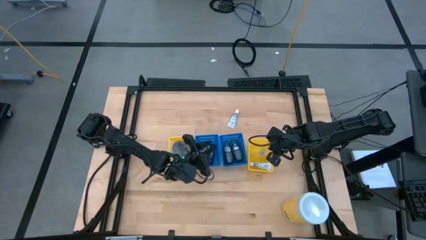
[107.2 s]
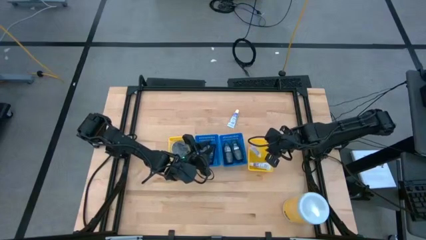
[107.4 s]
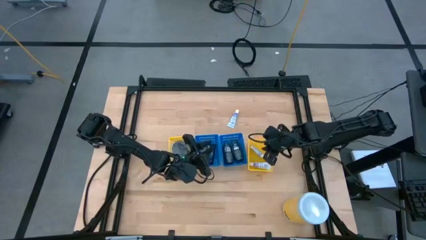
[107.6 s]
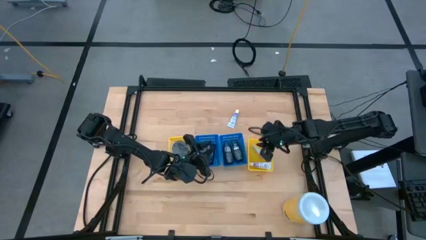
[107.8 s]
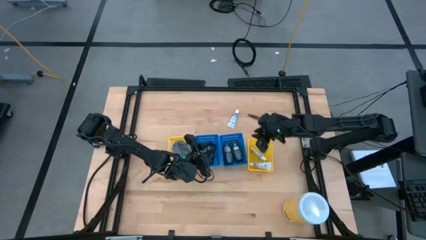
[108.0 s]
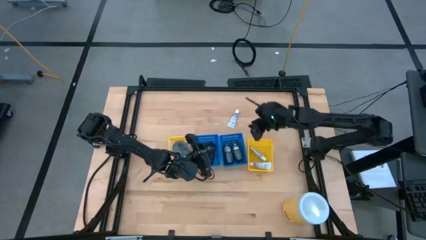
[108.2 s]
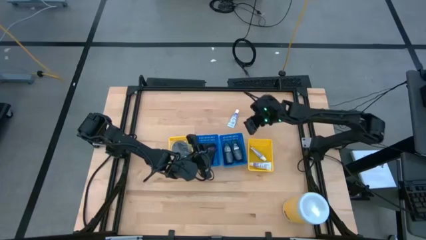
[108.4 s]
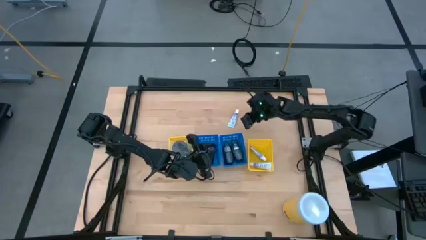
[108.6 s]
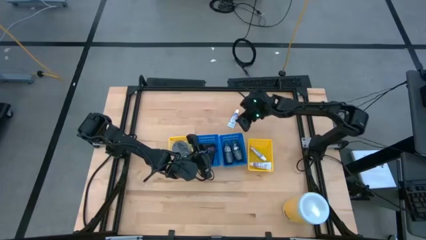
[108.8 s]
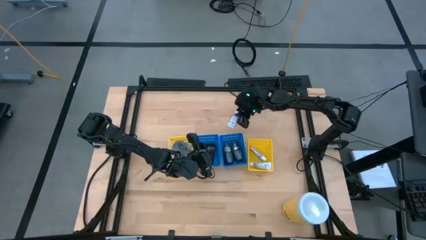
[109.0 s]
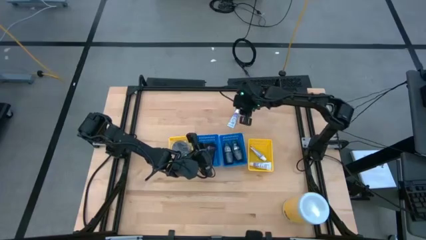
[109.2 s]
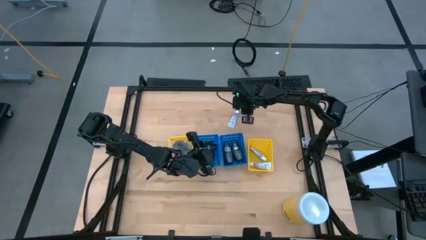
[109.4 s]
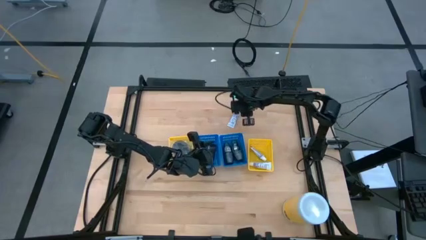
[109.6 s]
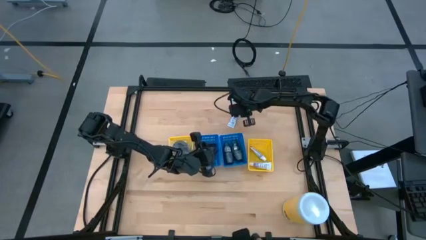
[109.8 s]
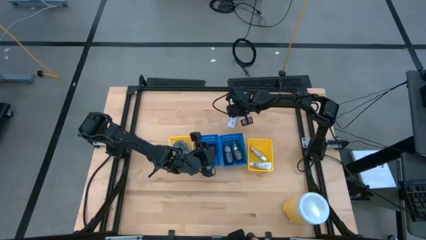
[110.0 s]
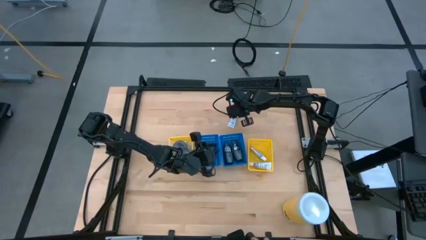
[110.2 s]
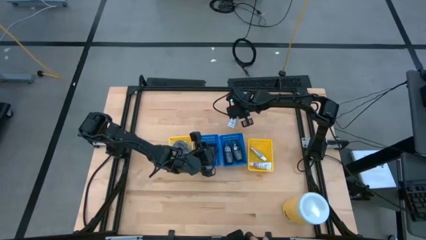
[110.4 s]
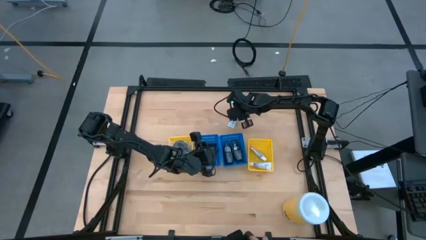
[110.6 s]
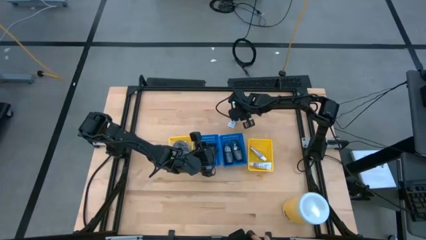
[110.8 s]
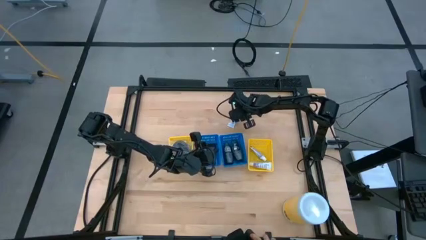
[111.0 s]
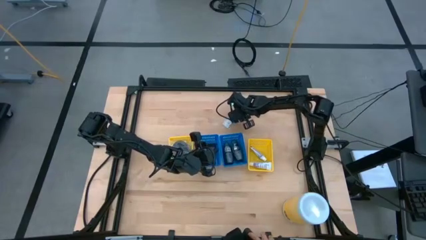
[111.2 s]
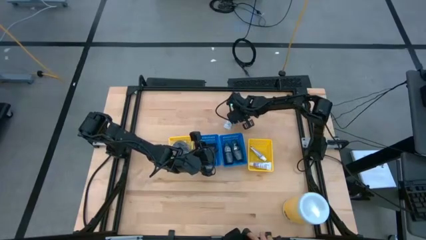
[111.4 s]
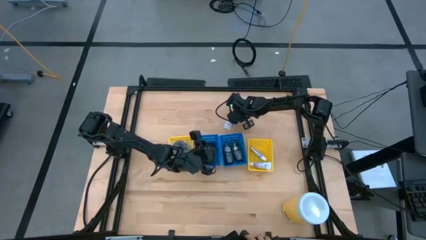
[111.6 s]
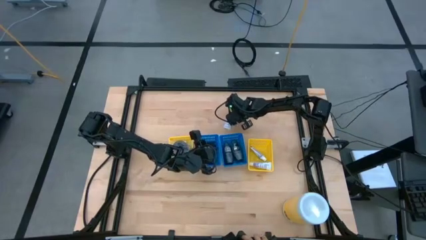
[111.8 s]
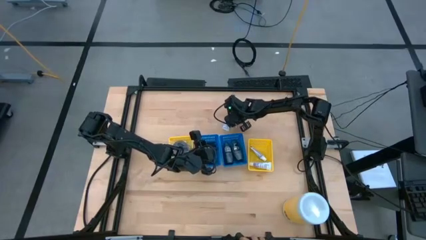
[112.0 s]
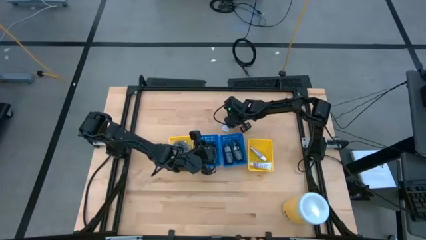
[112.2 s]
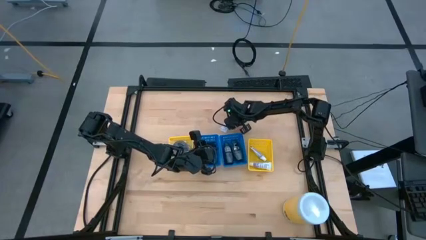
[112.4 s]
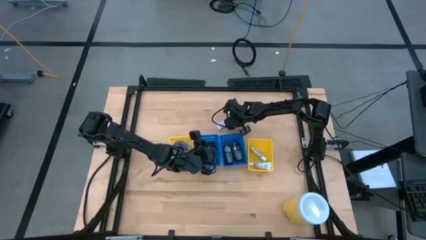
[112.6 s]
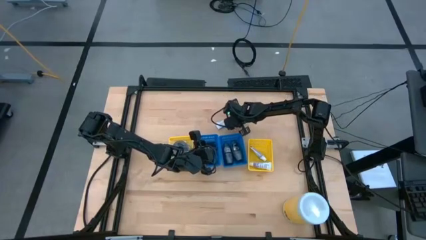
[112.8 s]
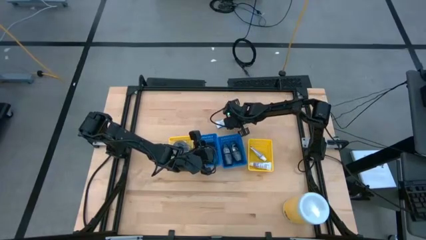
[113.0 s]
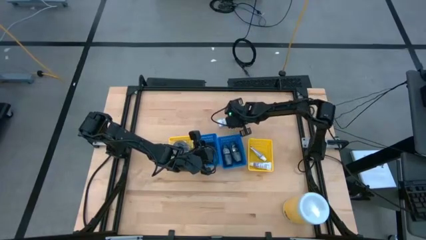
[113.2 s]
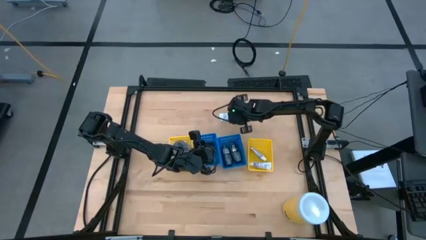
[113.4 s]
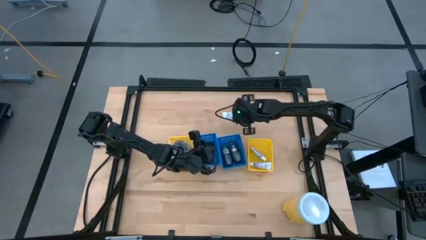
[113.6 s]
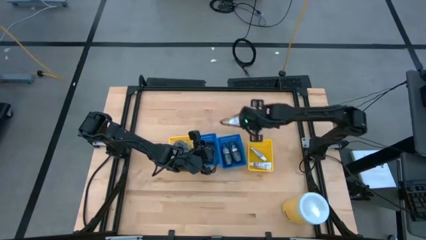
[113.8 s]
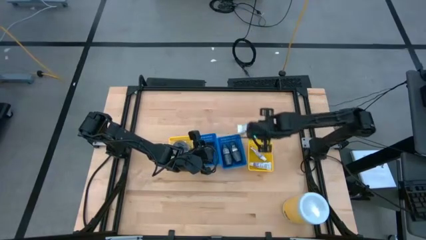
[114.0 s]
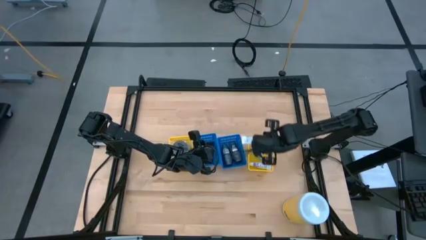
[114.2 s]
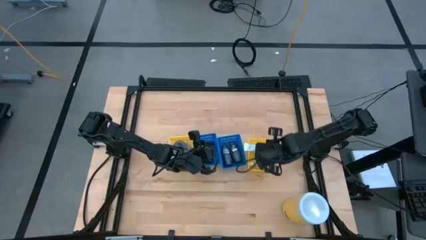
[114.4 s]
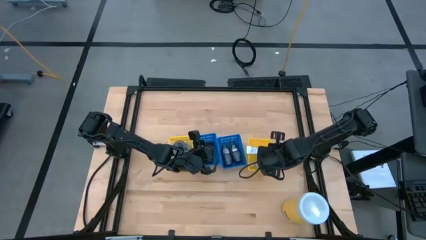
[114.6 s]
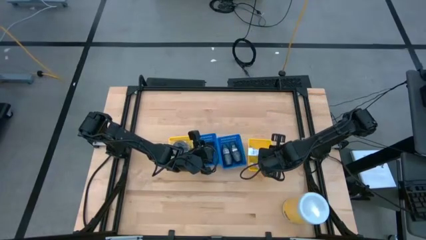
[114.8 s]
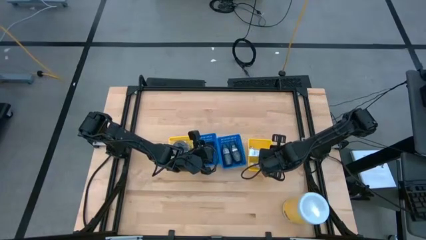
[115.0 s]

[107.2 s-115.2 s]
Task: Pick & Place Travel size toiletries
Put the white toothpaste into the right yellow bin

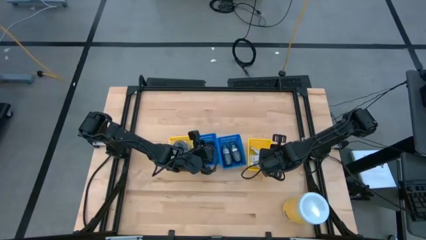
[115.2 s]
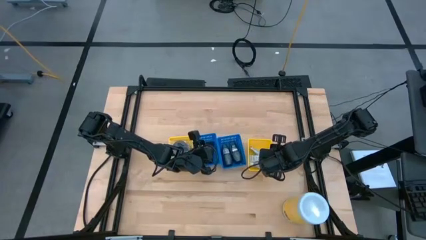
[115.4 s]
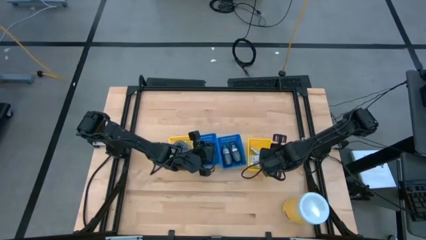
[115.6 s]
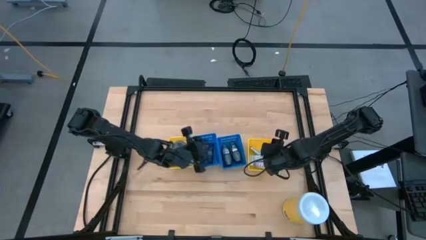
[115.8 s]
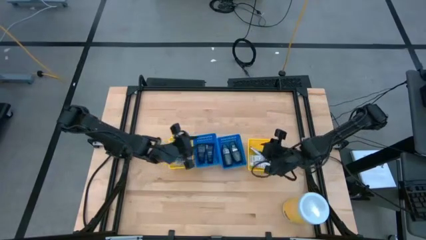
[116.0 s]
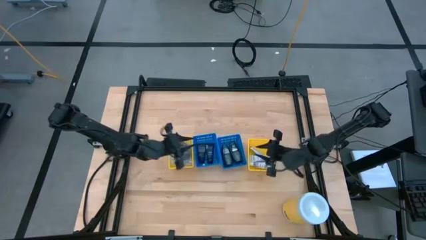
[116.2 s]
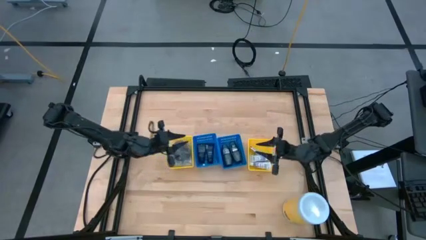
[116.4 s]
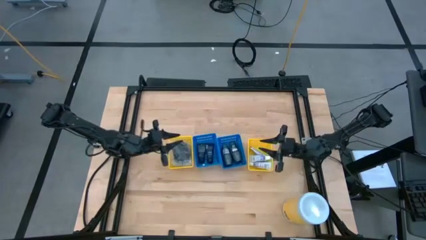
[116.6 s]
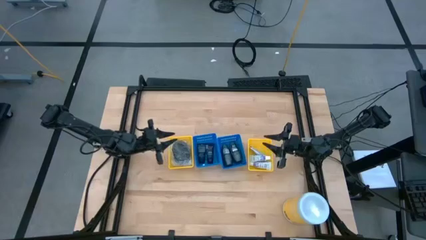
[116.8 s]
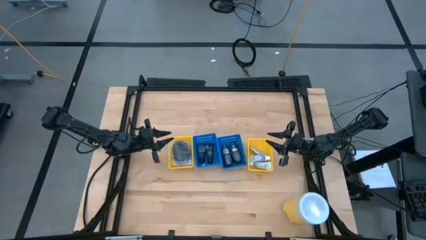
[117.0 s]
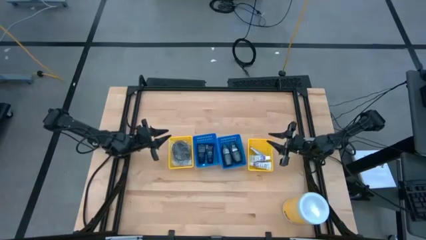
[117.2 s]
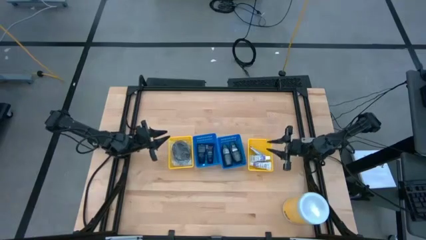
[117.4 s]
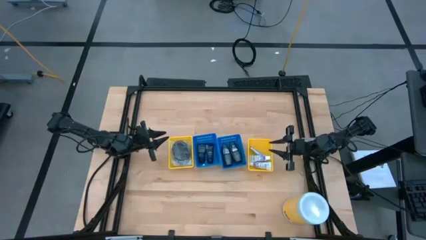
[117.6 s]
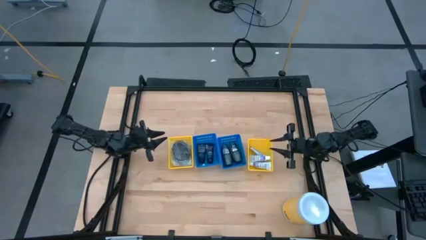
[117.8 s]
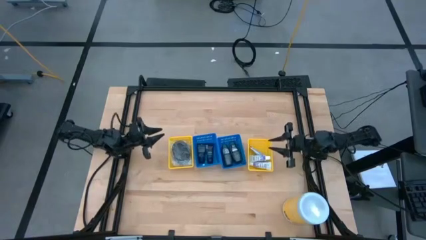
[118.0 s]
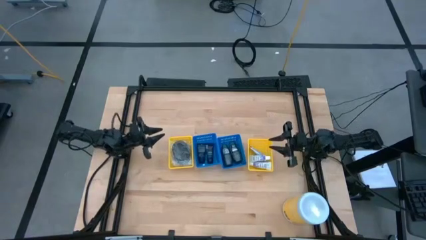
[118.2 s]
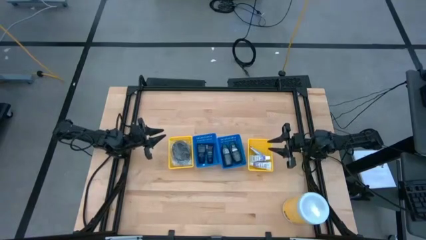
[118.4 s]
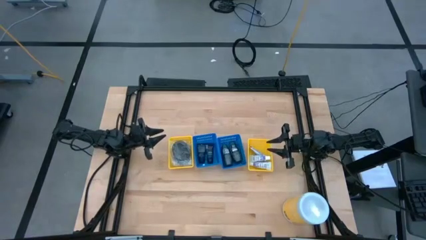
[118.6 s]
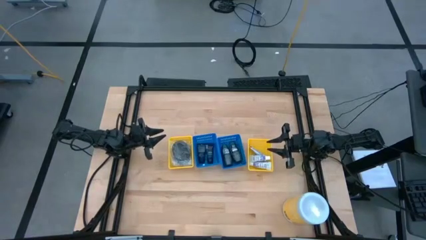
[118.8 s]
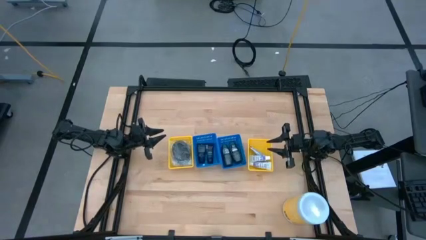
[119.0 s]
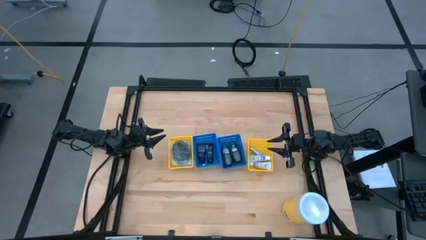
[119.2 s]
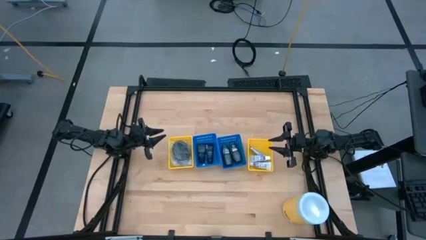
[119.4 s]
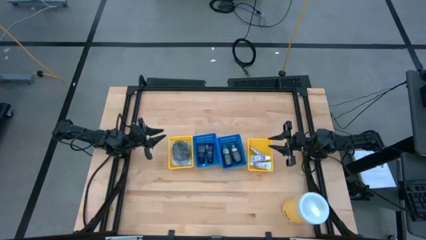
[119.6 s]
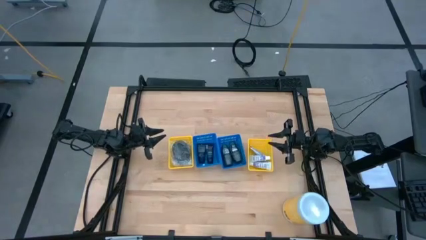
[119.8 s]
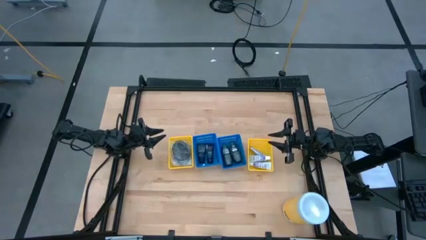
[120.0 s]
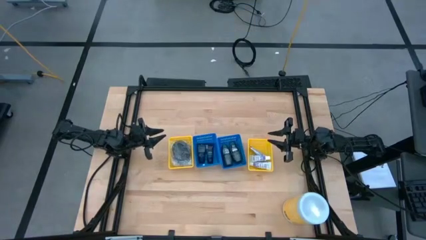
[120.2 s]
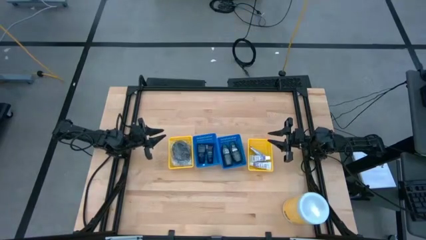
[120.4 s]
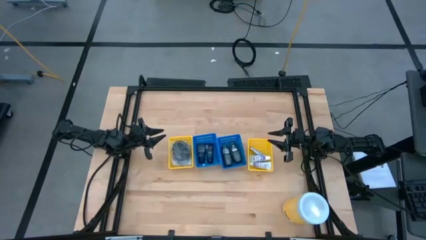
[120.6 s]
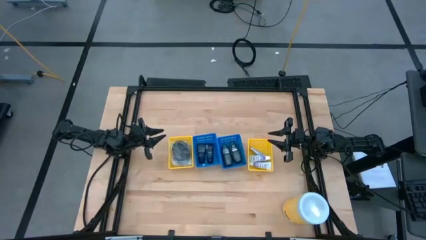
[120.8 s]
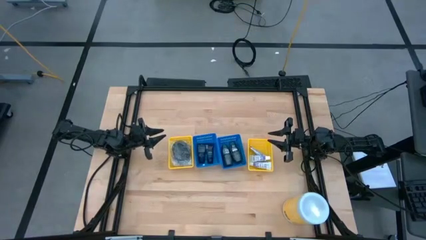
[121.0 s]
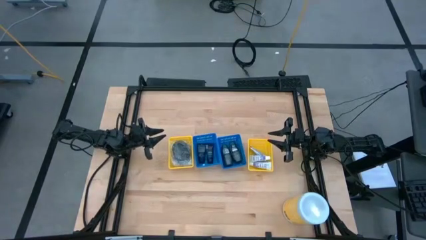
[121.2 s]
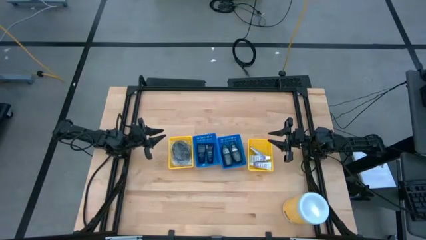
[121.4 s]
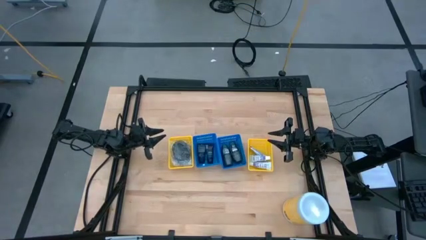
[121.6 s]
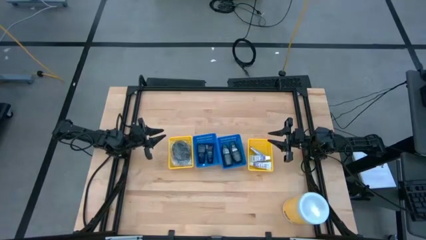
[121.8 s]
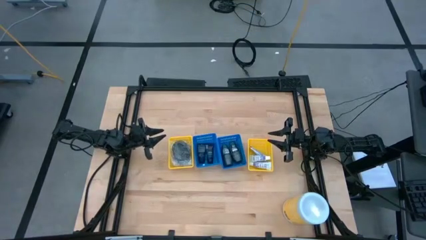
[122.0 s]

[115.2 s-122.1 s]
Return to Home Position
